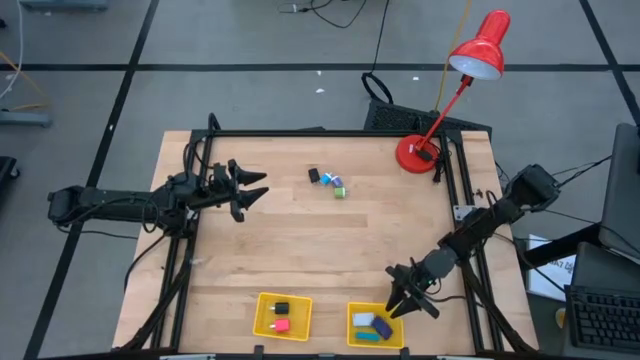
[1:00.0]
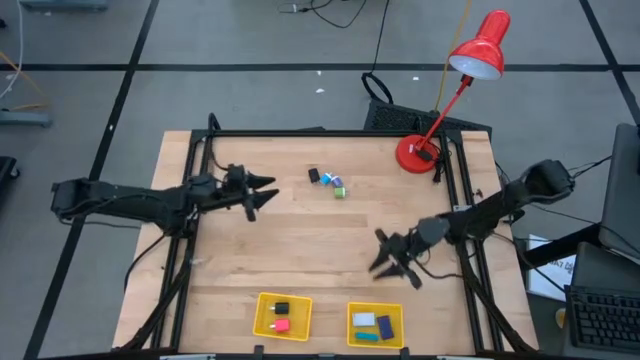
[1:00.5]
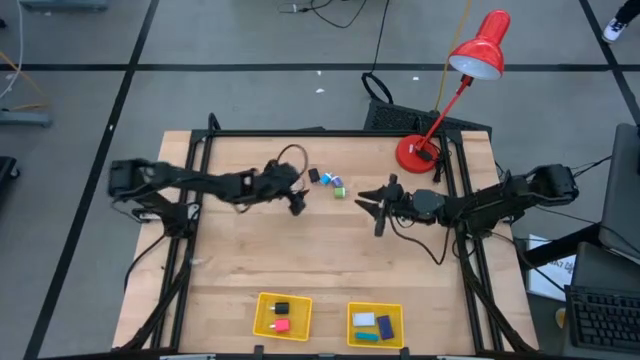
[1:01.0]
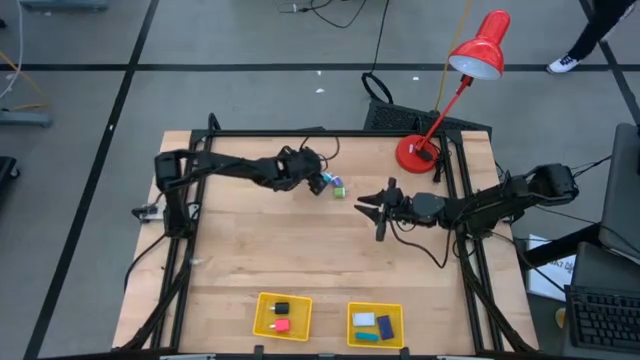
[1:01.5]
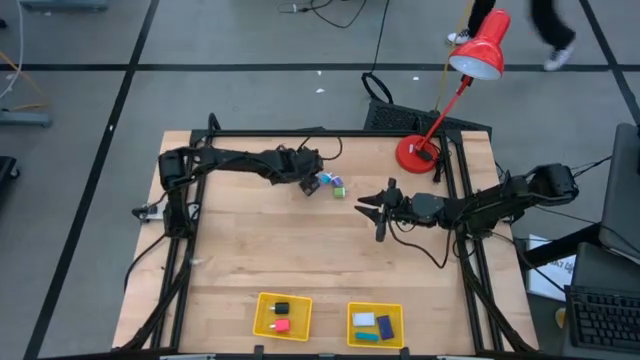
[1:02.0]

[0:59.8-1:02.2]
Task: Pick & Place Office items
Put the black adapter into the left yellow bin

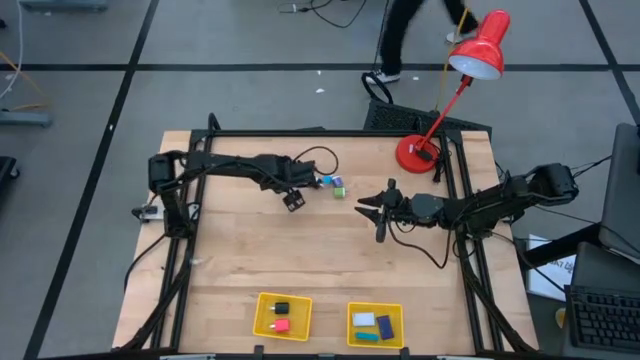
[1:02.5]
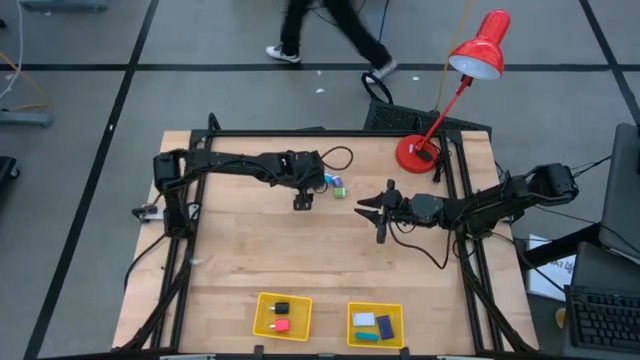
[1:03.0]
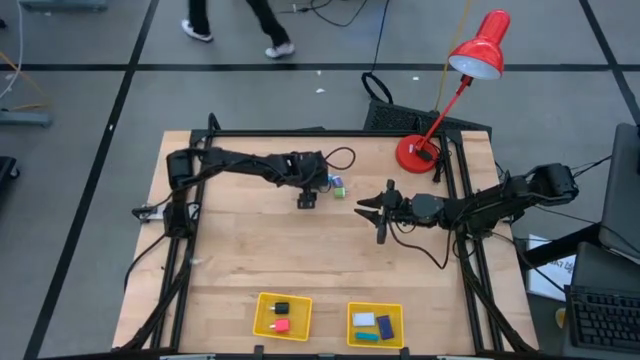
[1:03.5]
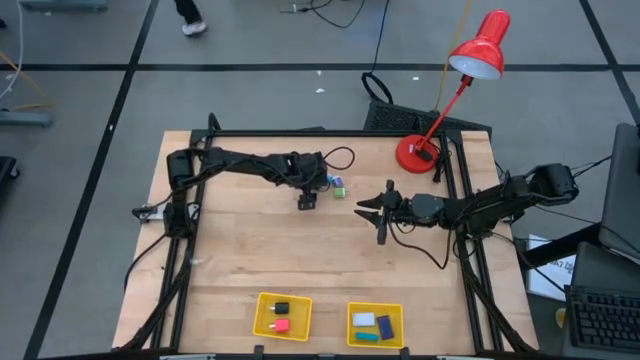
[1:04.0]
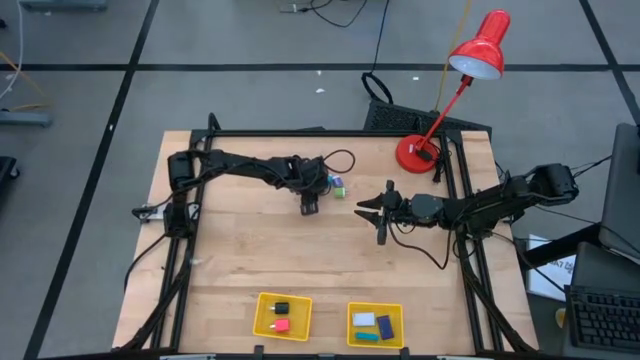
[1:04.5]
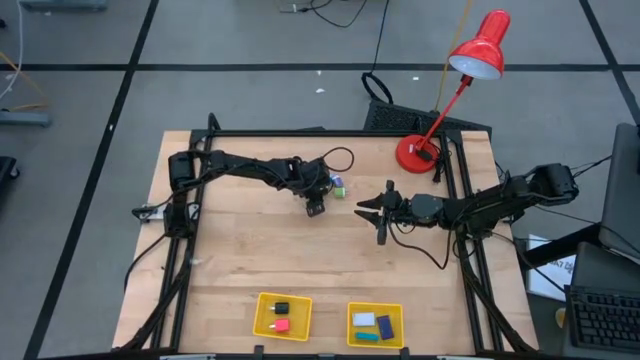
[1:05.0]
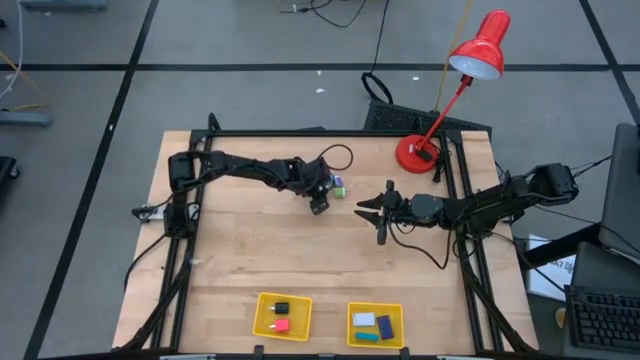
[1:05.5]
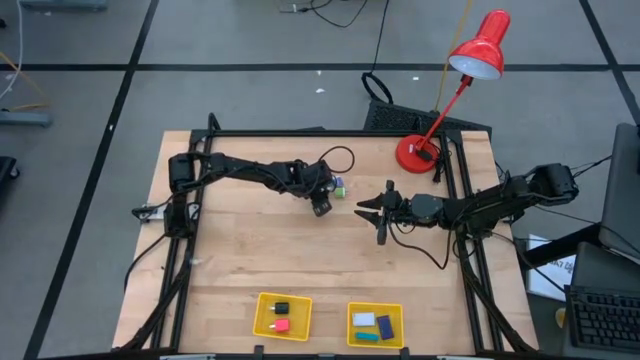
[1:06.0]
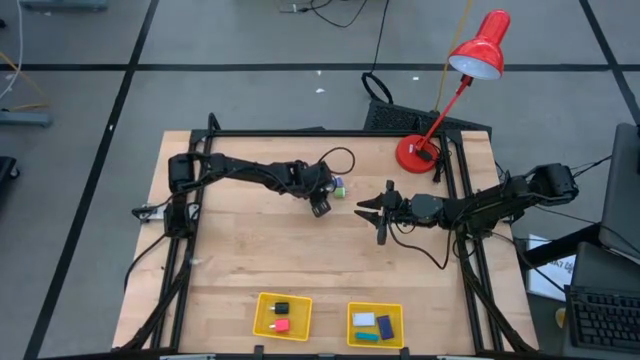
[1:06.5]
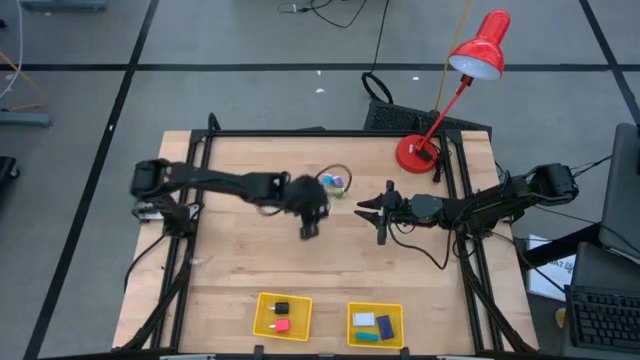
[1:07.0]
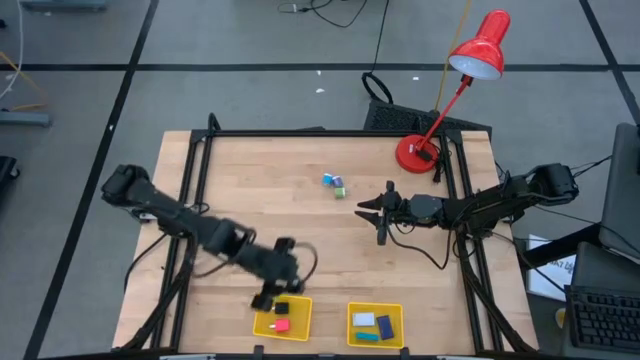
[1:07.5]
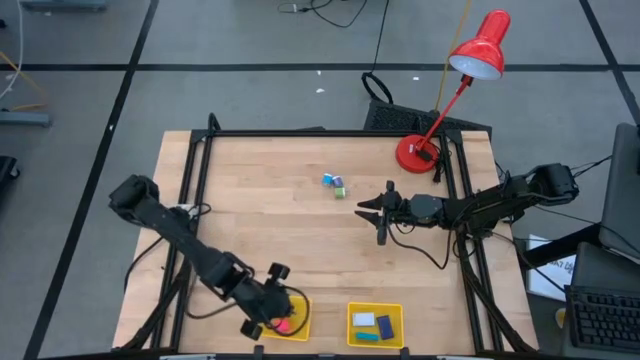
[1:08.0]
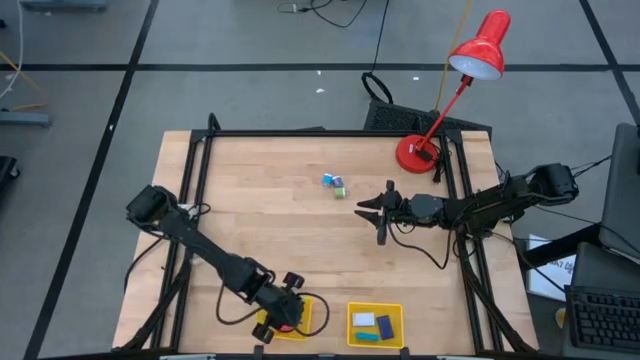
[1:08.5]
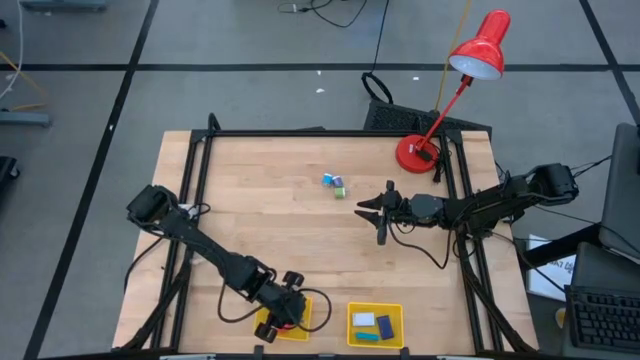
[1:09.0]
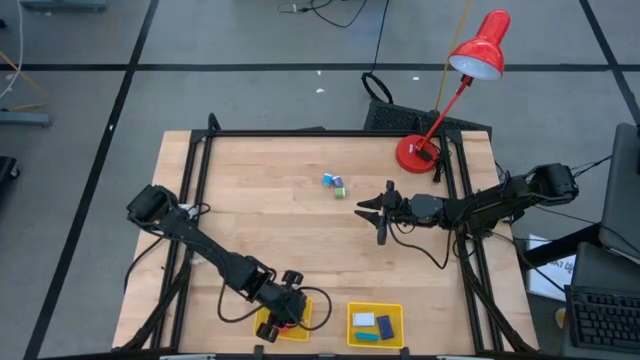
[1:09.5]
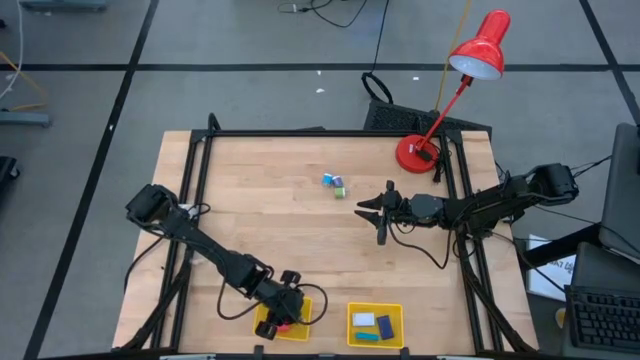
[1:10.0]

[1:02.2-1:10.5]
Put the black adapter into the left yellow bin

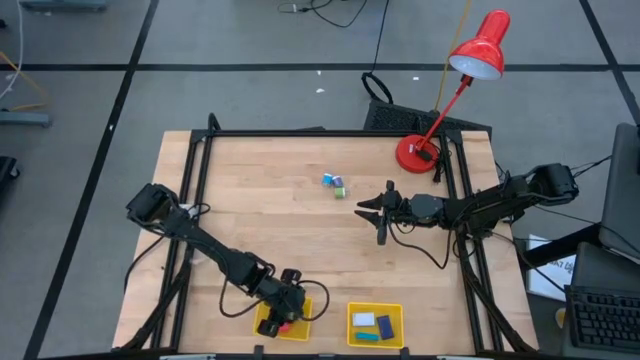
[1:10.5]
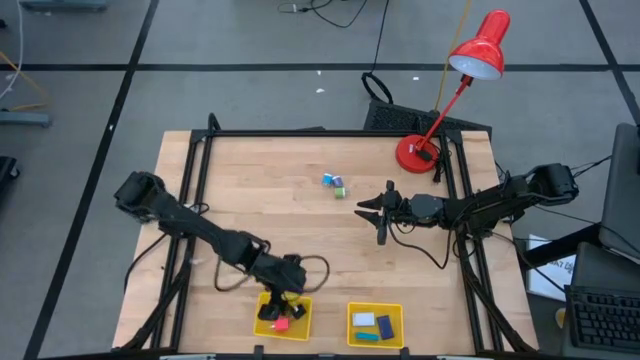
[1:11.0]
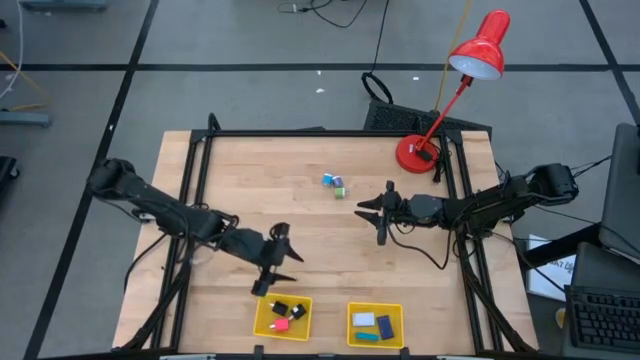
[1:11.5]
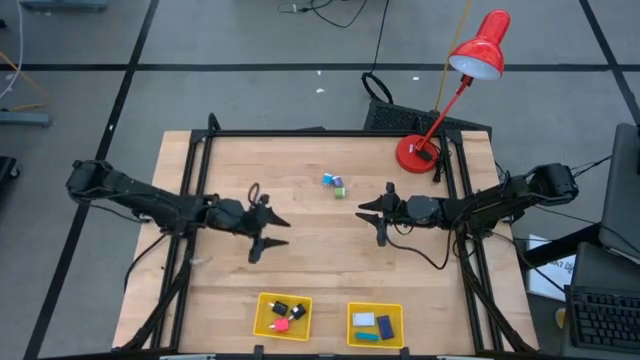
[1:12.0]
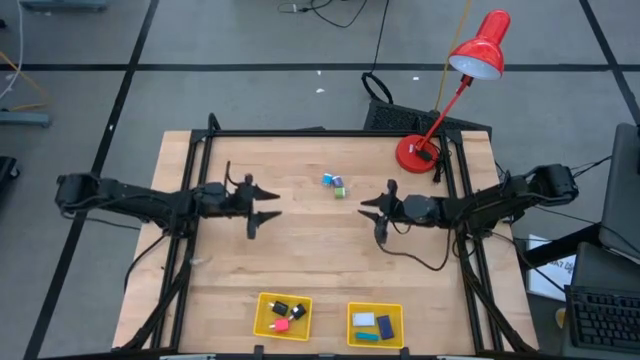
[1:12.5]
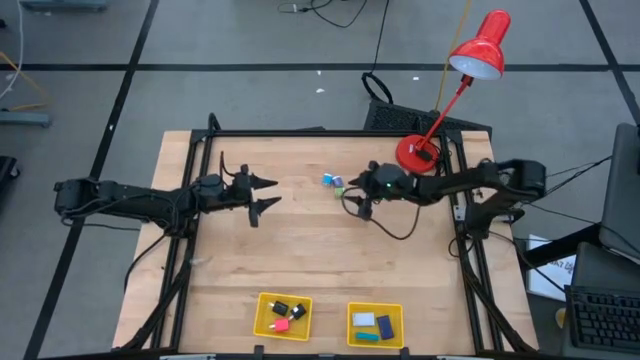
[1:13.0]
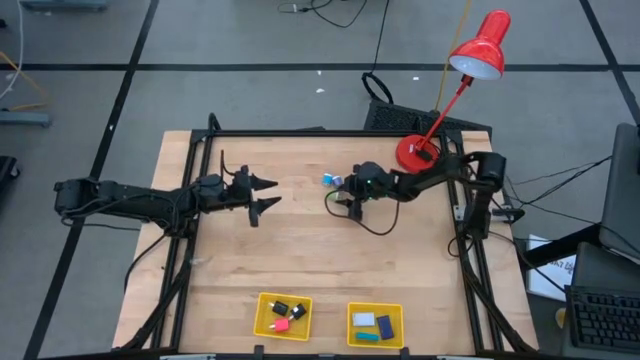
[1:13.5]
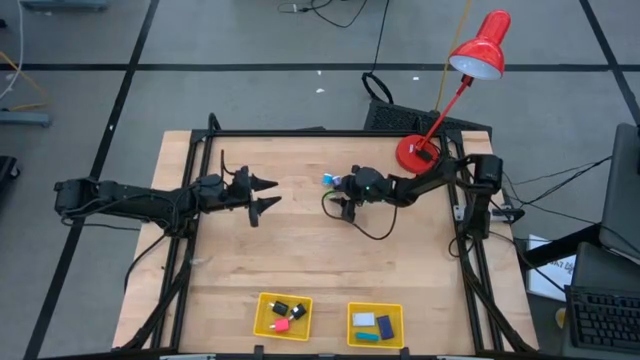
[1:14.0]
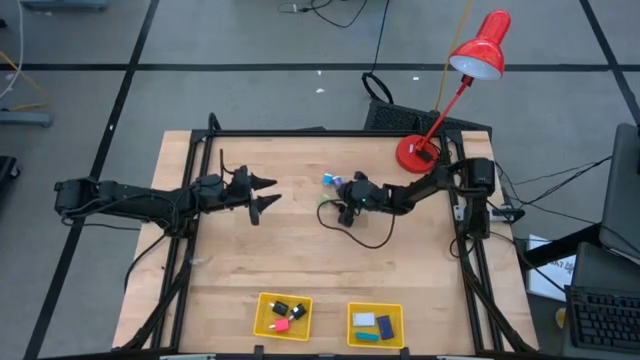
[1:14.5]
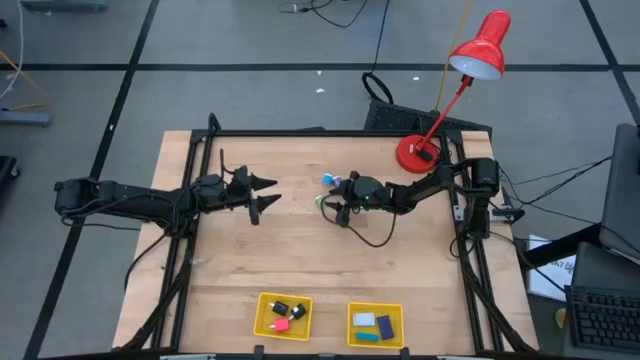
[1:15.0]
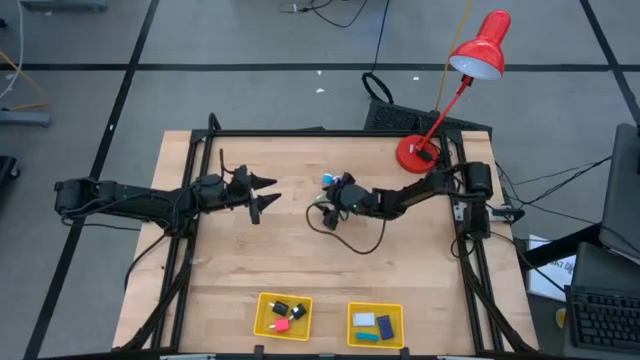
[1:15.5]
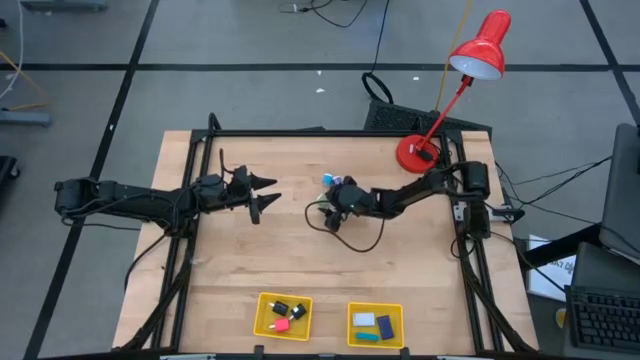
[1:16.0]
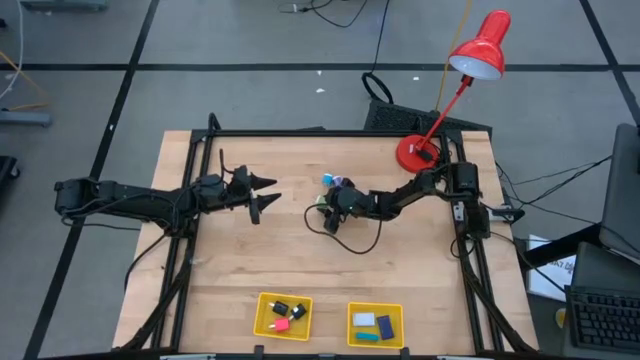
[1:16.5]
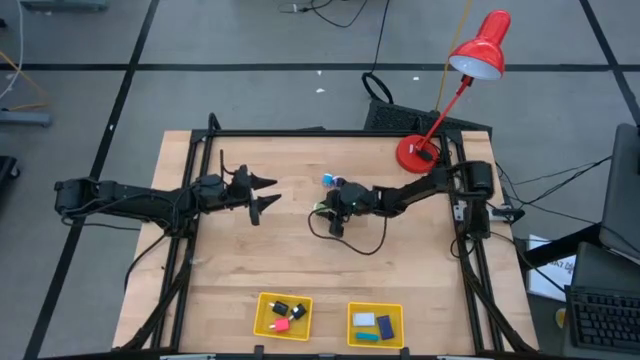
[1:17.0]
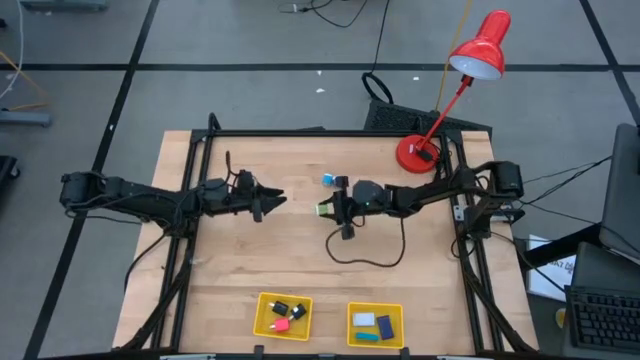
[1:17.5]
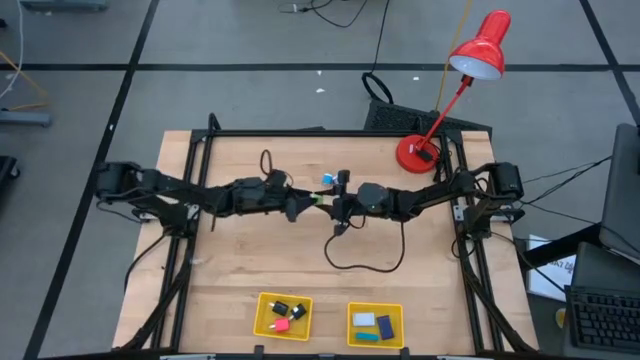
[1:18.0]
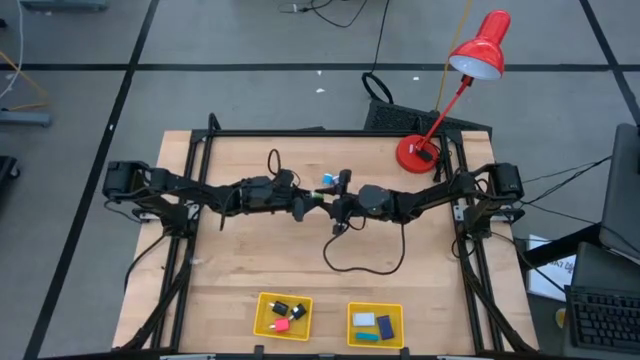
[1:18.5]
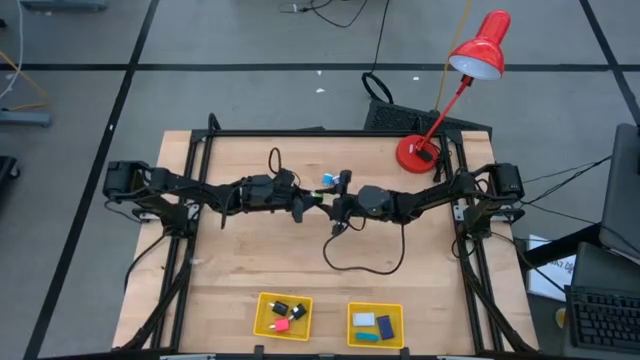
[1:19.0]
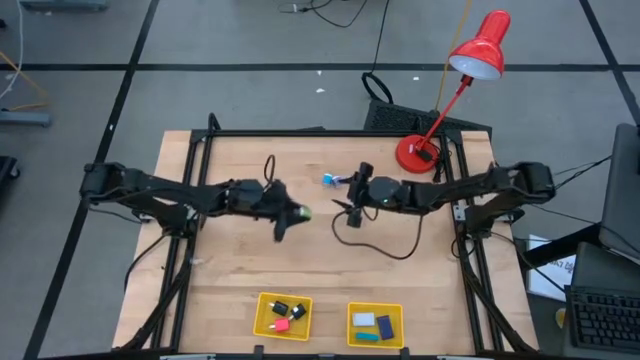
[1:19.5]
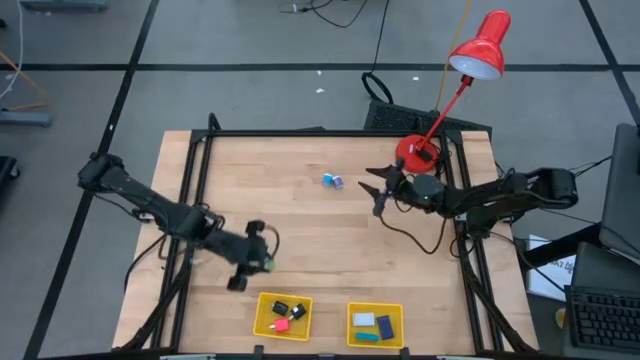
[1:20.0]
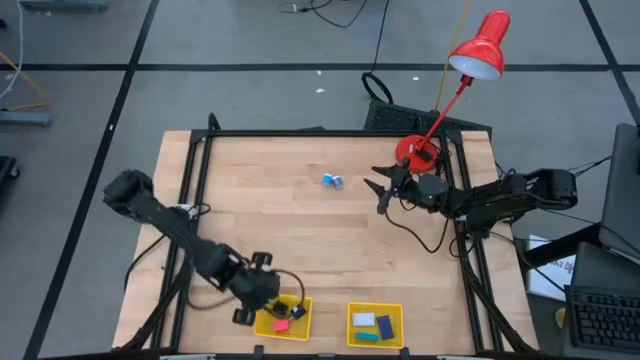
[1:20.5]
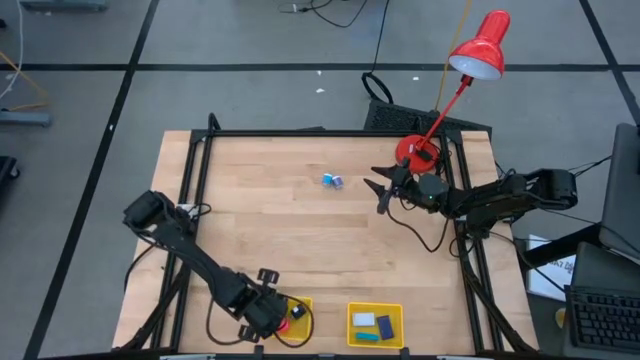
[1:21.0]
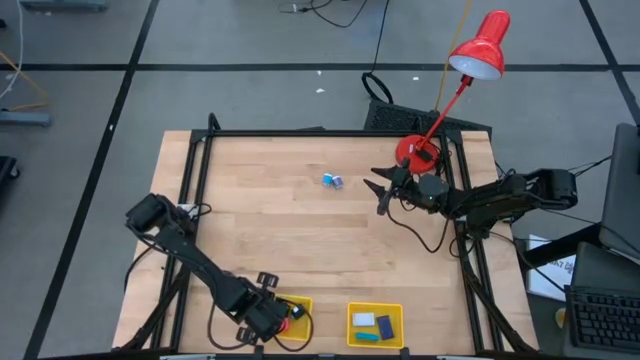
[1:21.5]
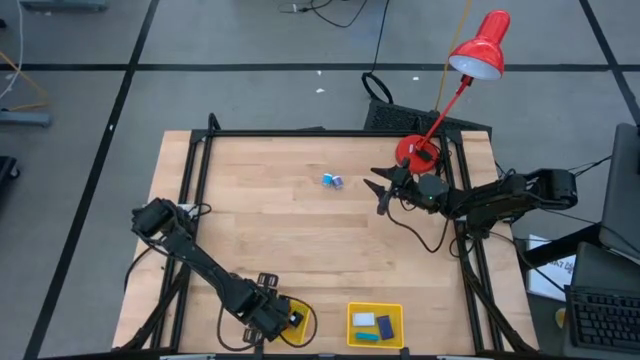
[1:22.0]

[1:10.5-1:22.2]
Put the green adapter into the left yellow bin
